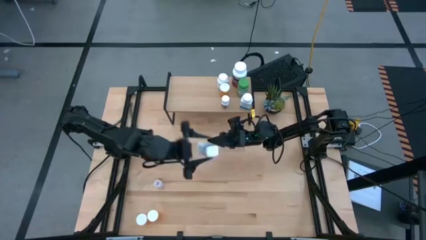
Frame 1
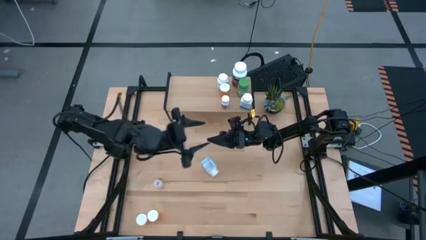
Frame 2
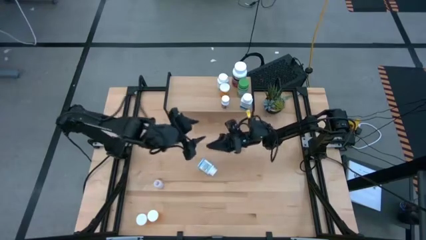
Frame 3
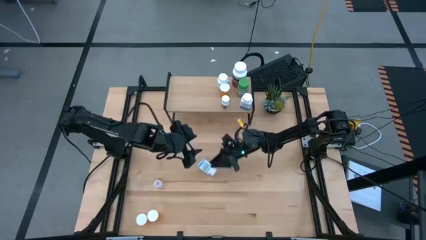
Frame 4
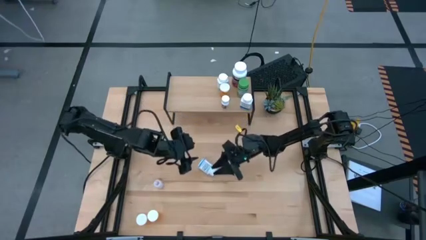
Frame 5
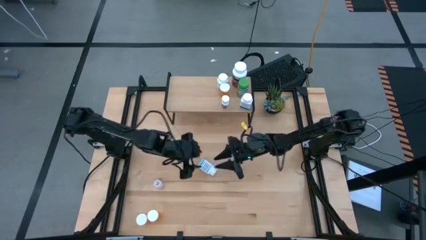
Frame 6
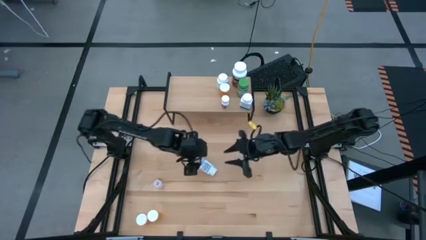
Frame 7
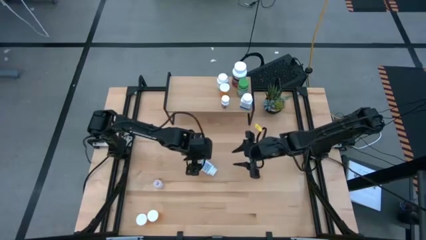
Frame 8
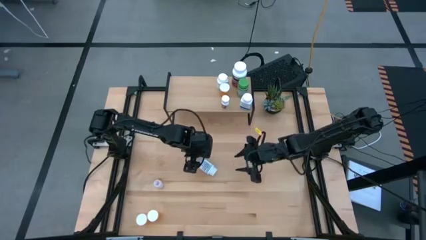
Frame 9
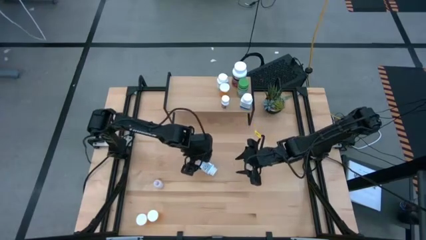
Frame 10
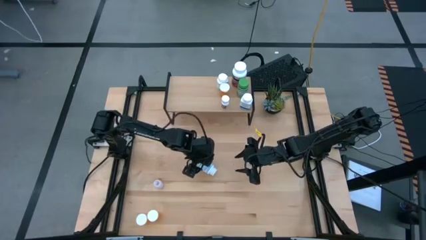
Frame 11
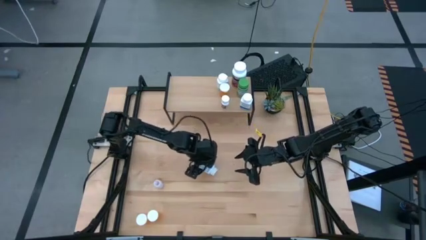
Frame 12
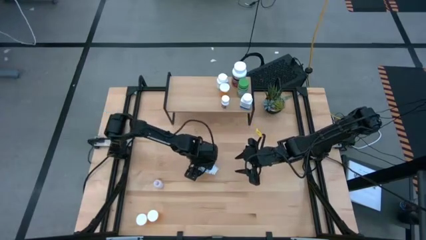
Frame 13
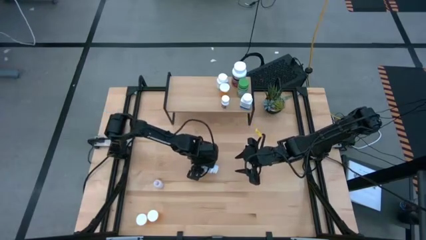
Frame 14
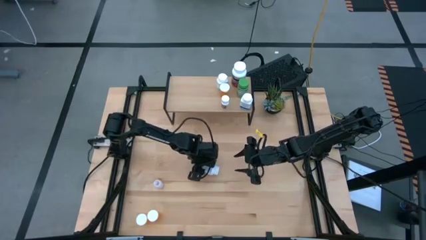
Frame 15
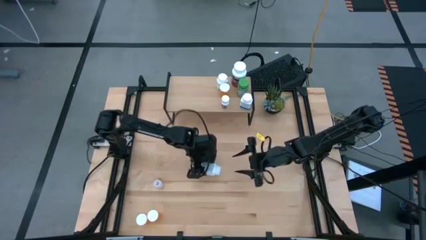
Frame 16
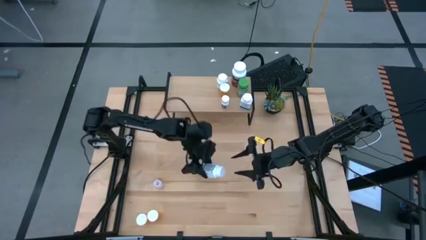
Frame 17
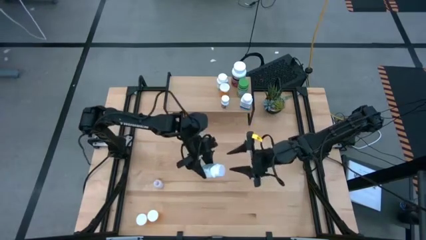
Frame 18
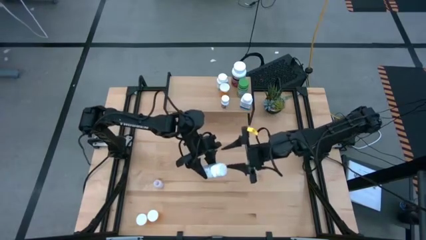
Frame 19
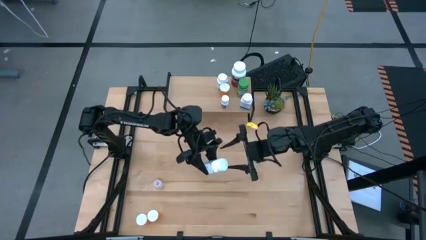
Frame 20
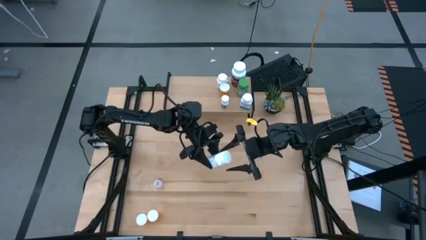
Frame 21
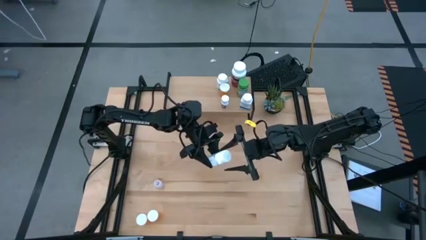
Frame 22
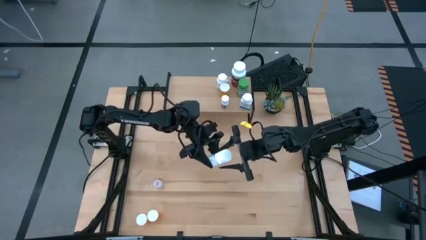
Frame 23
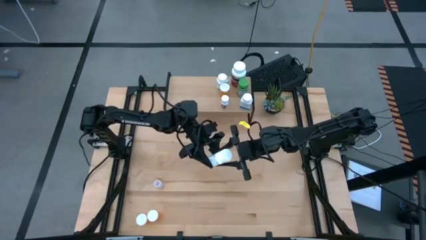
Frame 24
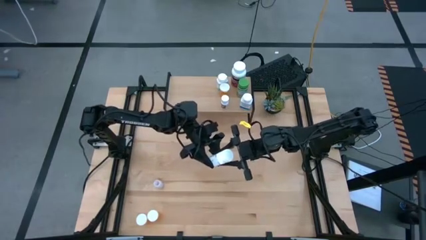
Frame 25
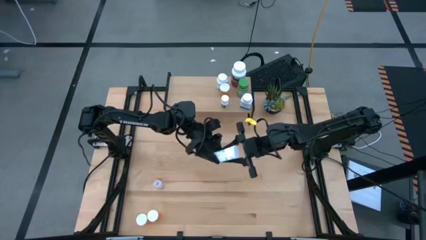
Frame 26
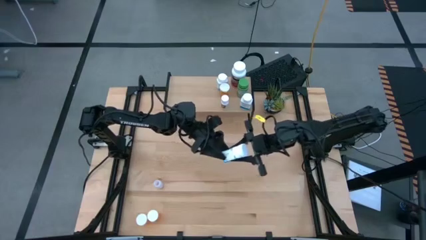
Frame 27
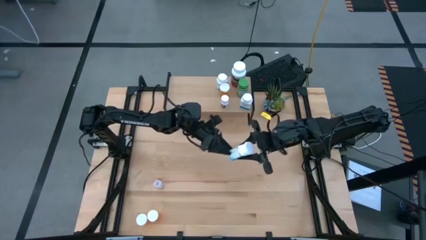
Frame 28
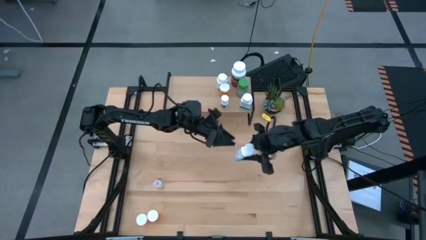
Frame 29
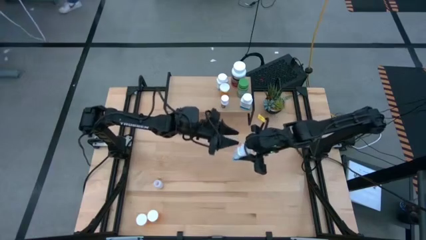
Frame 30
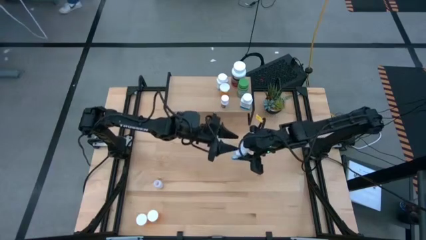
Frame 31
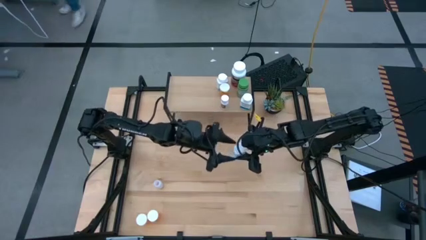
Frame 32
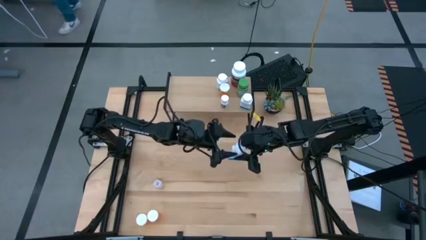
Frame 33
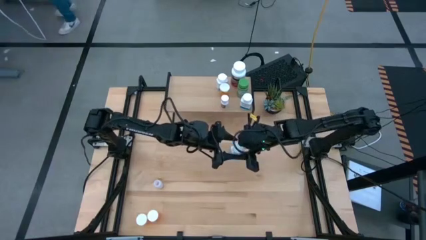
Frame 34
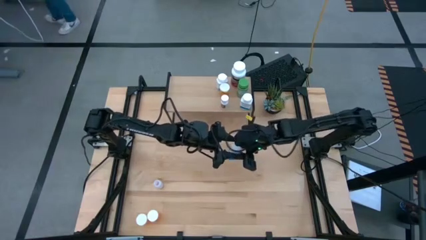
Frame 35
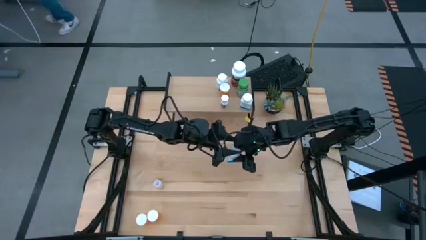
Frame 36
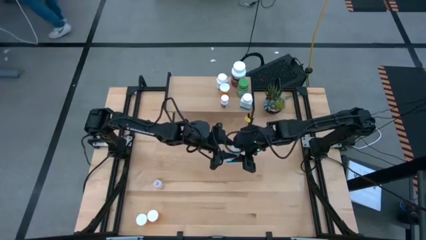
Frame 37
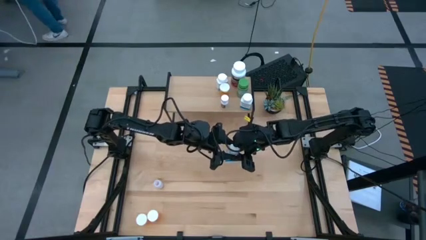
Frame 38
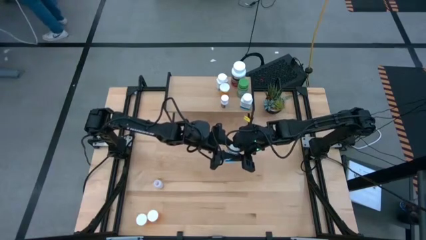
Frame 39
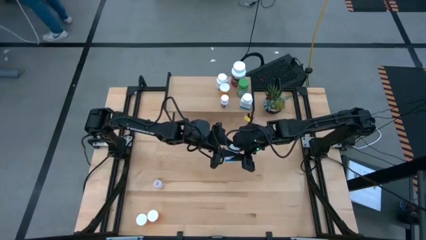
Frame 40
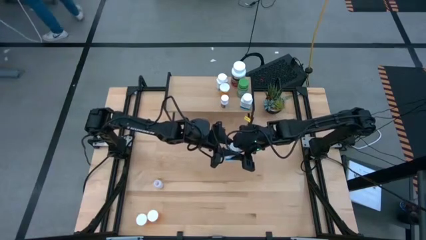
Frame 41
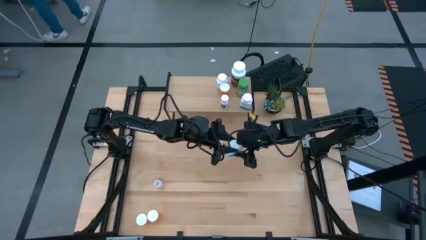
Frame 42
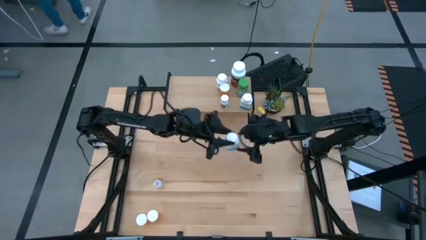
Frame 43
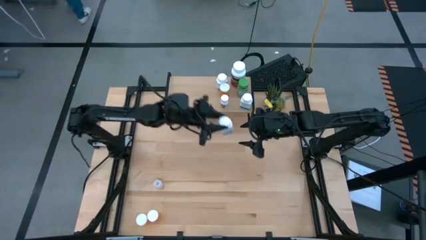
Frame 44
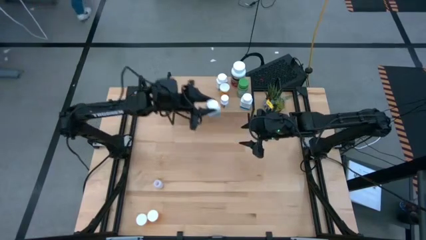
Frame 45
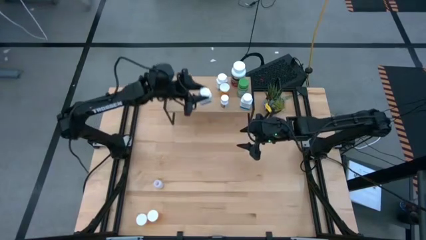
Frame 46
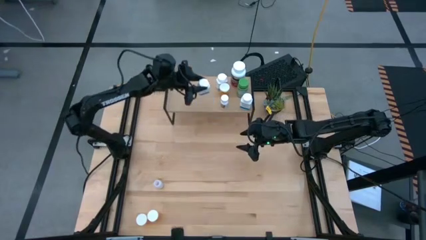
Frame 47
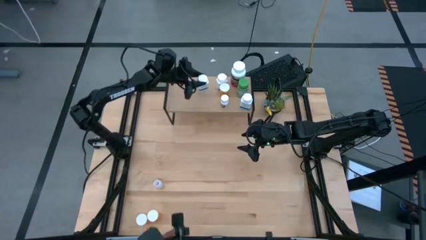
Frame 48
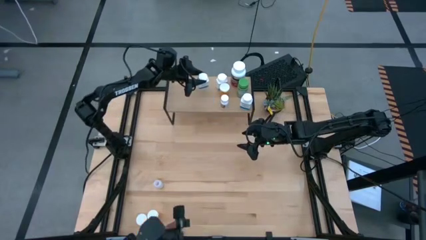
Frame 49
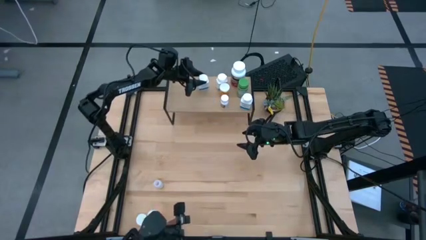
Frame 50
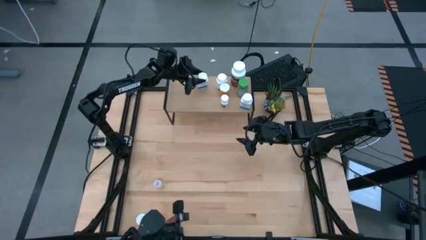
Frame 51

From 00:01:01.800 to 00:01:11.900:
Task: Pick and place medicine bottles onto shelf by color
Put the white medicine bottle on the shelf

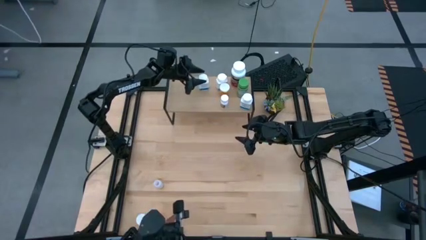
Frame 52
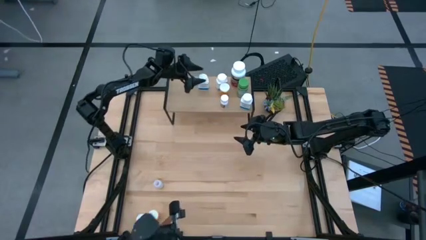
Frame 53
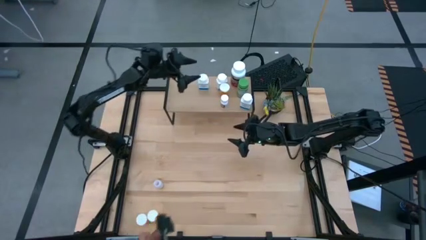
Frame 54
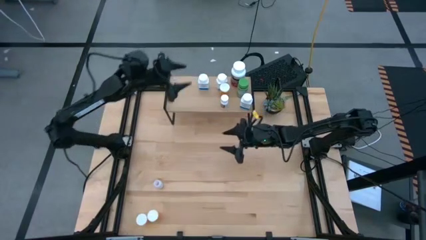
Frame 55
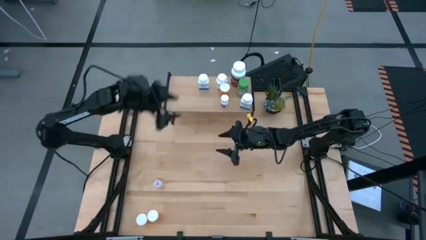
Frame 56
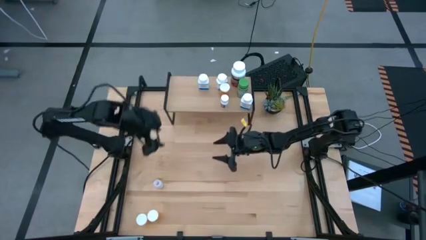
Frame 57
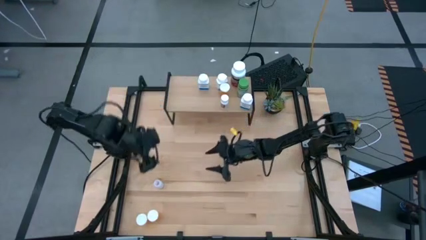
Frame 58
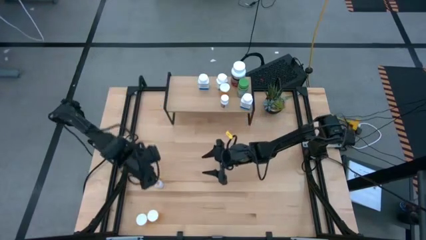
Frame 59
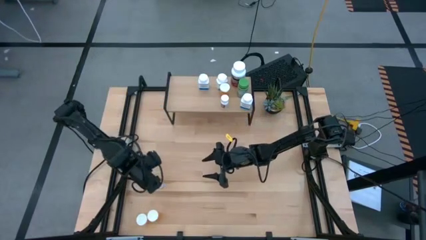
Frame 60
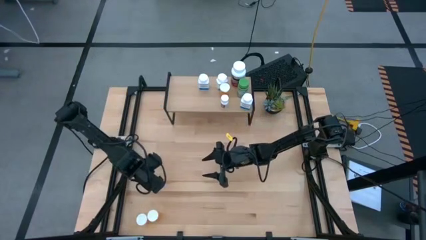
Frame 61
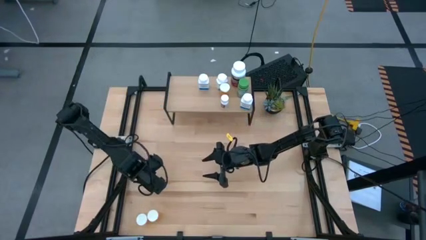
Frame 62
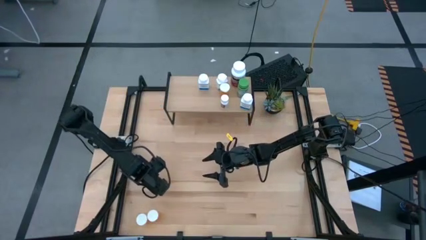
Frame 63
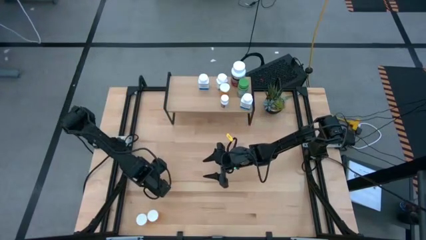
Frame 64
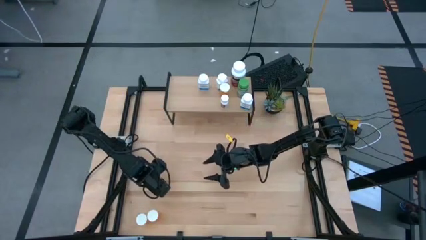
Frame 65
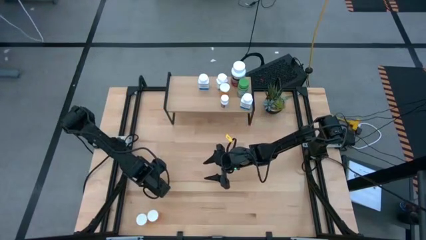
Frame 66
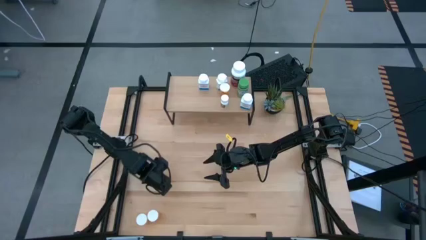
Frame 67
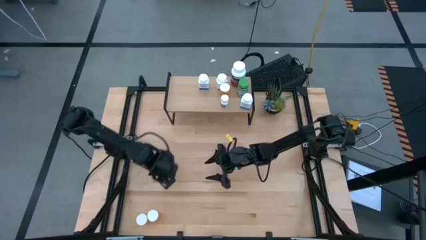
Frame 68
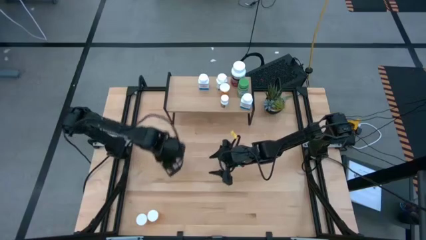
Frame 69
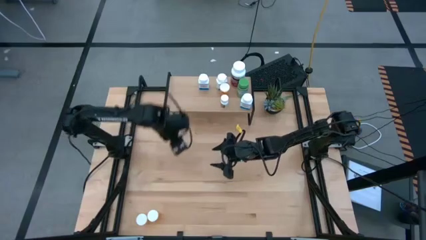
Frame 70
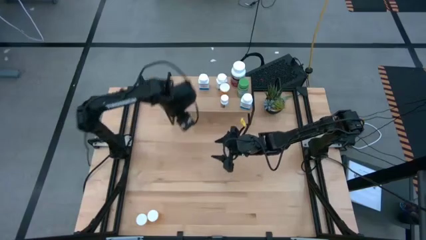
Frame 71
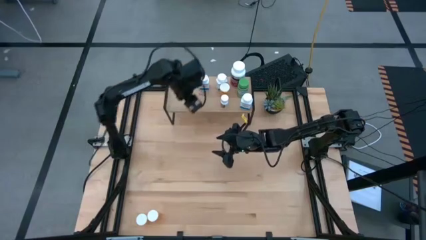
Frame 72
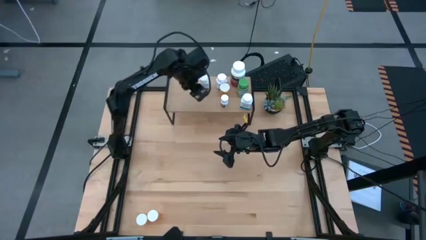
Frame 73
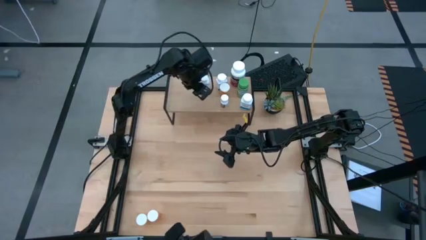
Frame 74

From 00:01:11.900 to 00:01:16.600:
Put the transparent pill bottle on the shelf

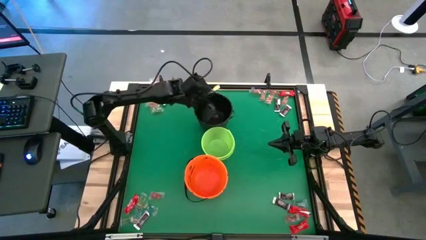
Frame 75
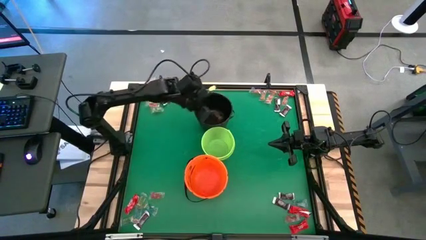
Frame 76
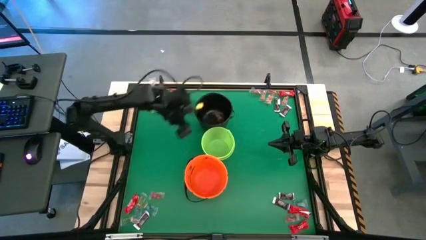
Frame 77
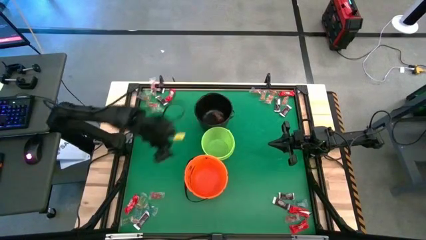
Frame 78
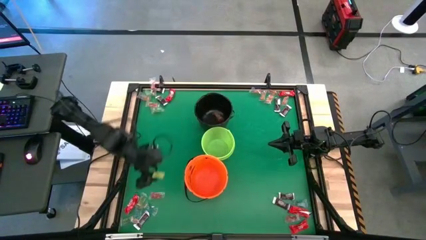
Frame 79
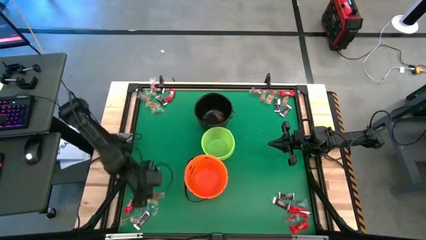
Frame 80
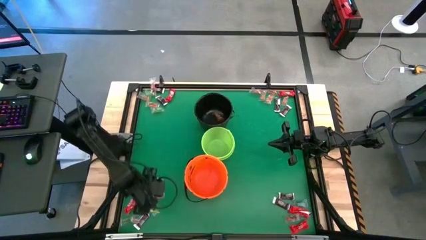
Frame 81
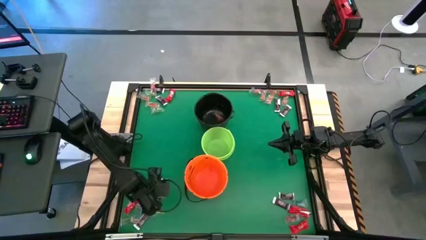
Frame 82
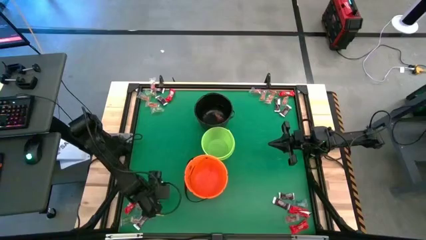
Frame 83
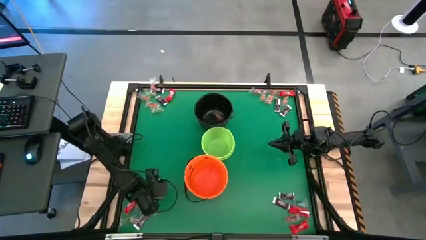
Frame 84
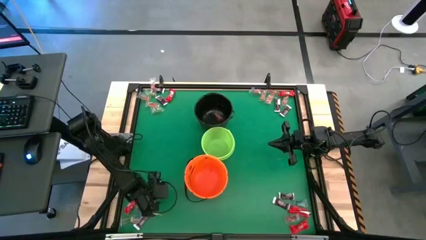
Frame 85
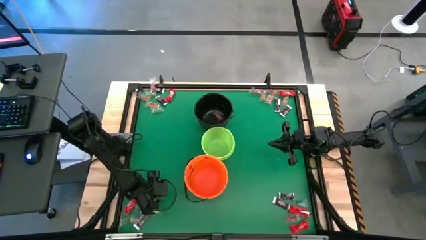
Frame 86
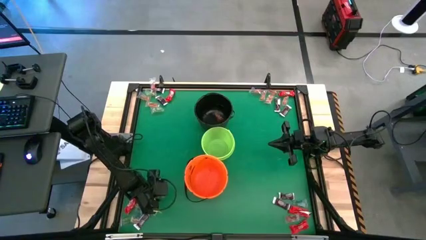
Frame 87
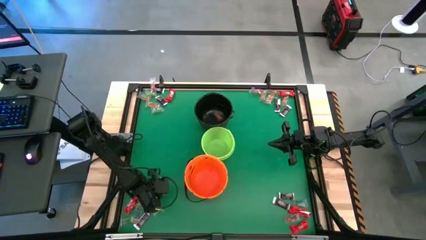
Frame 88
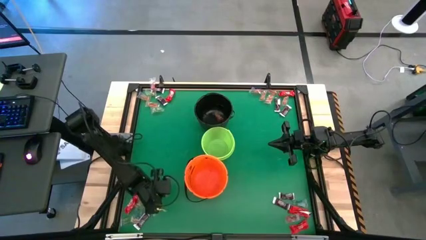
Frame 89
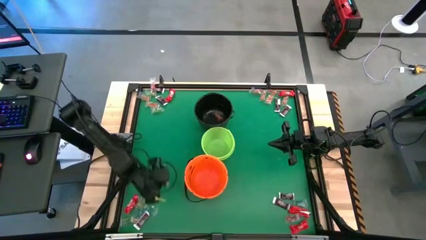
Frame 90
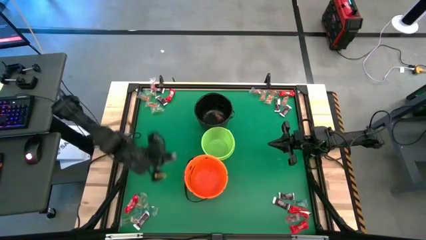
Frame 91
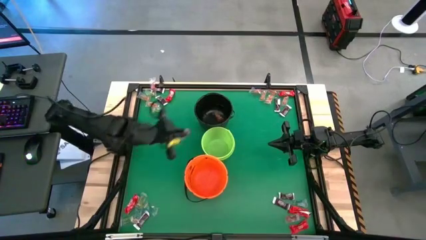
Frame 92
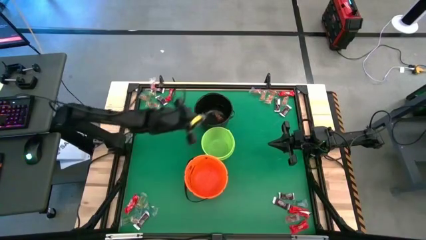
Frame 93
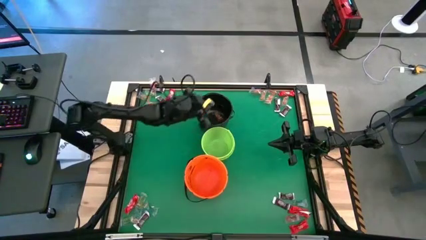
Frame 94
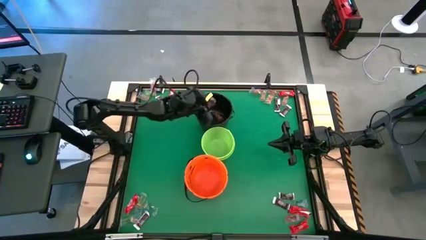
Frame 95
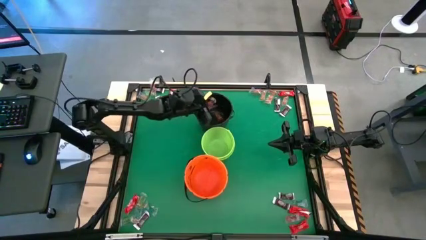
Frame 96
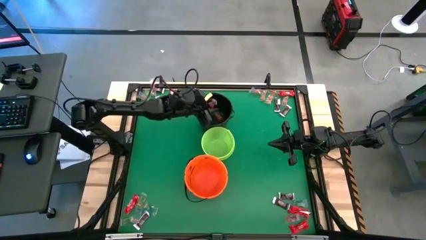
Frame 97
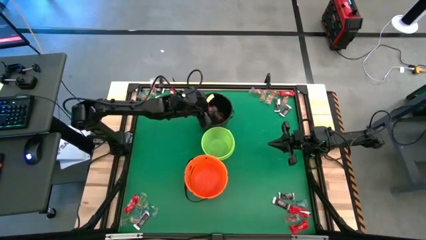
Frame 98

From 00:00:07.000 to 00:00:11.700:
Task: Sort candy by brand, put in halloween buckets
Put the red gummy into the black bucket
